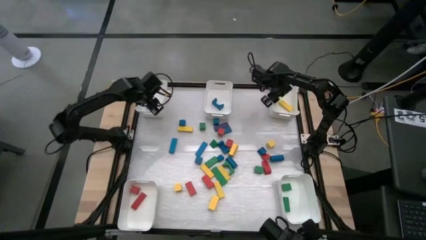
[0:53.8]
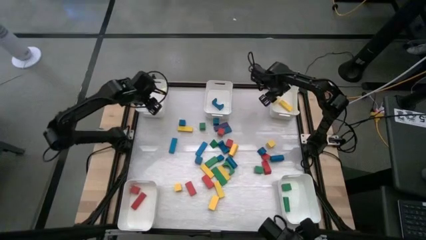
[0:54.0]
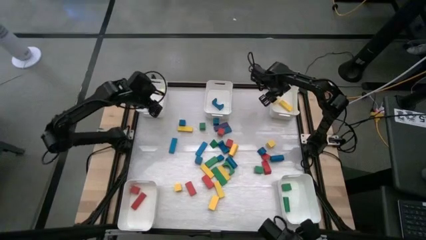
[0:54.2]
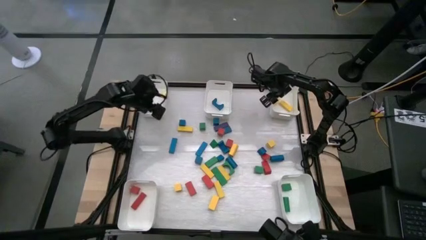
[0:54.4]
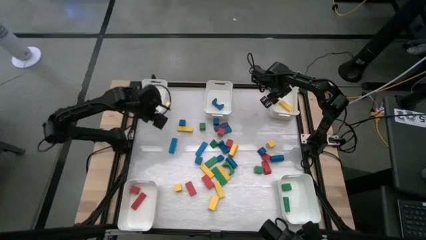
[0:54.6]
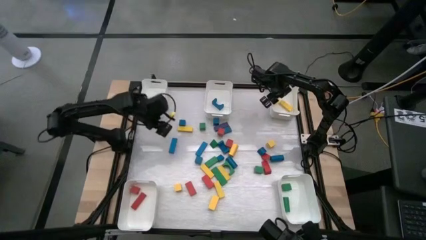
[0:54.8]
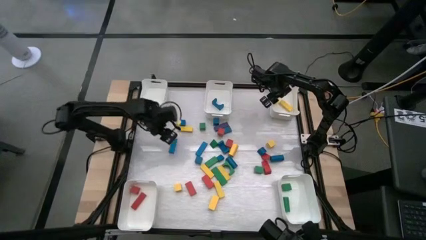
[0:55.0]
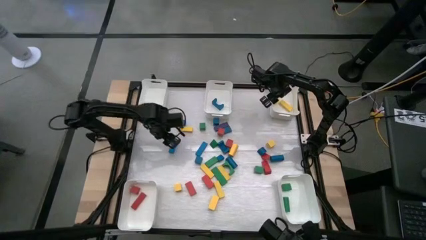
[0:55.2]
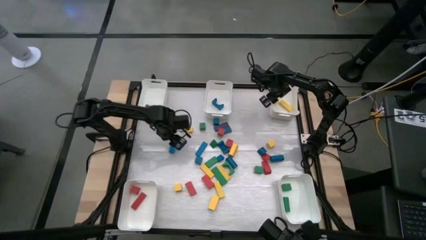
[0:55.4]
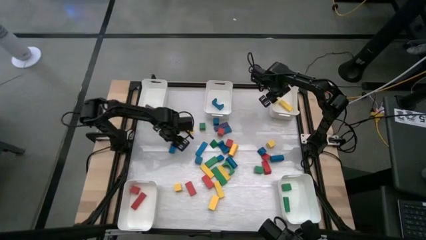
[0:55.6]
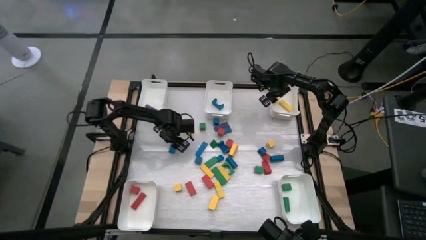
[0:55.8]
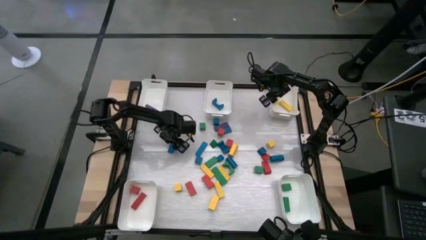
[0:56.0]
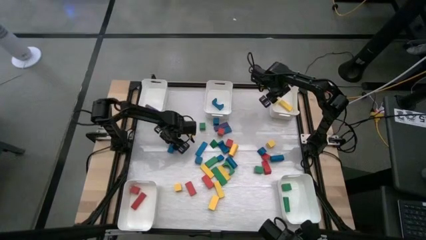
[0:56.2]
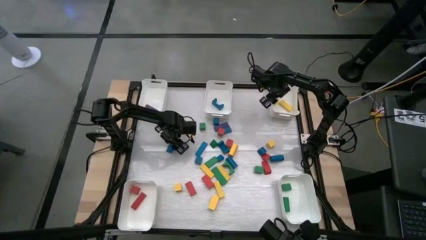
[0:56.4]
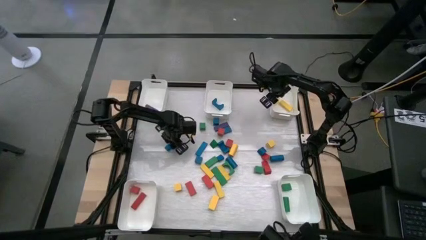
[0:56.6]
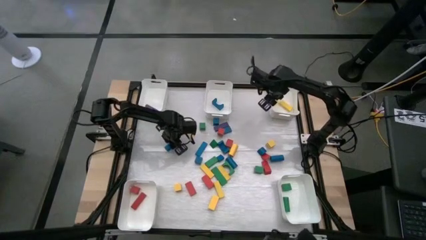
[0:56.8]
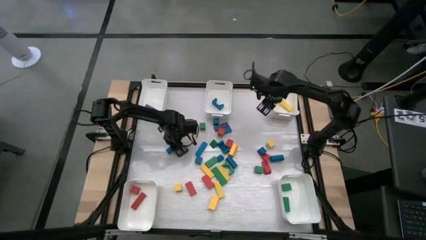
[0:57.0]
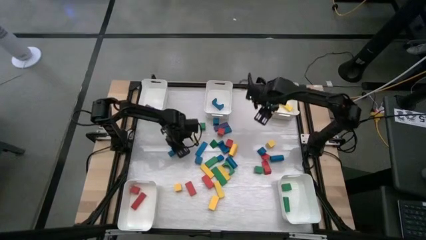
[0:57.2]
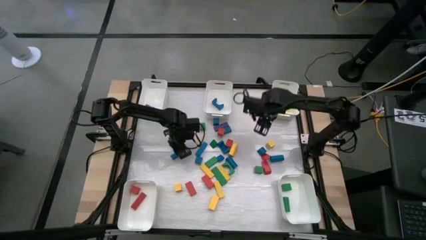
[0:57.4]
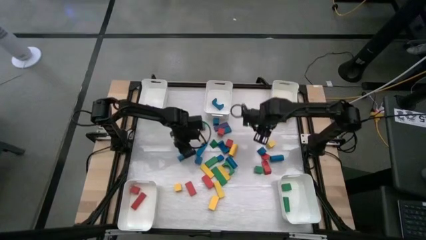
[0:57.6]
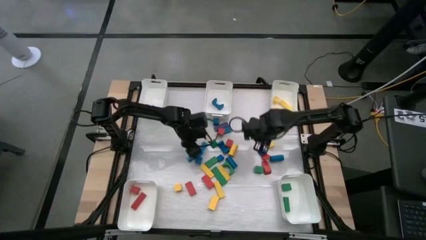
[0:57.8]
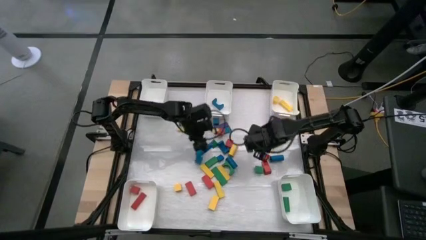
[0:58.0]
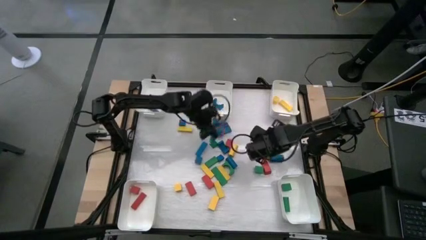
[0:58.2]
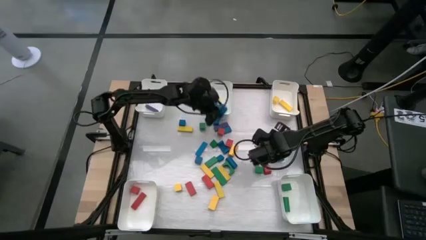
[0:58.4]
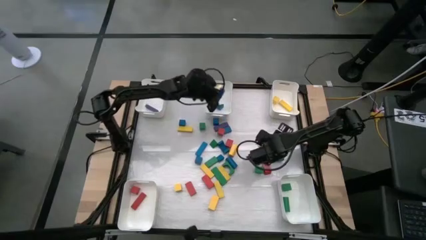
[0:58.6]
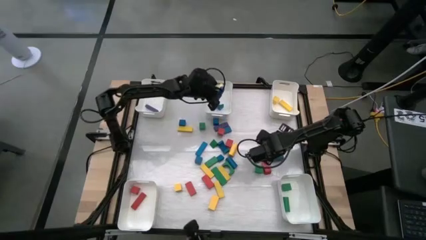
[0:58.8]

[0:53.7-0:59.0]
Task: Sort blocks
Put the blue block into the top center white bin

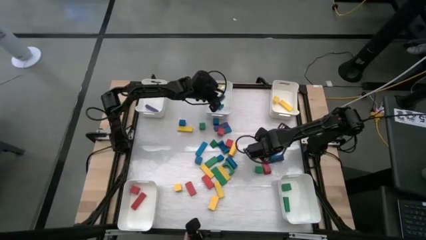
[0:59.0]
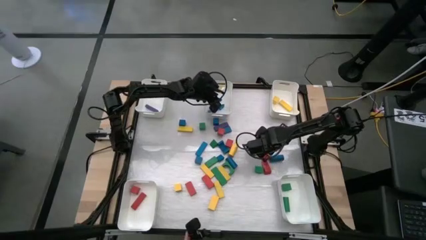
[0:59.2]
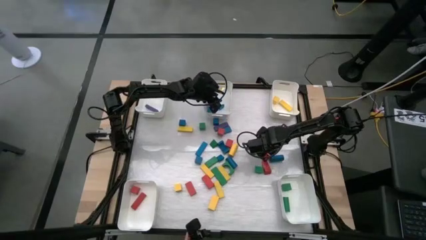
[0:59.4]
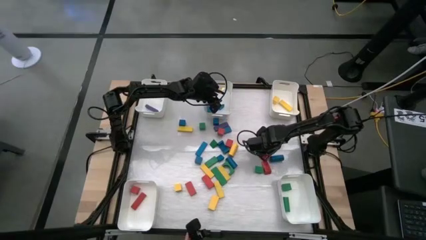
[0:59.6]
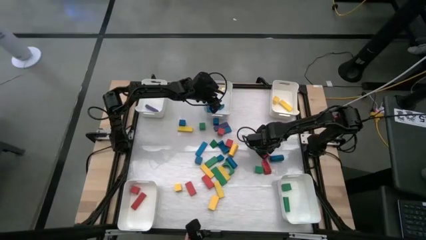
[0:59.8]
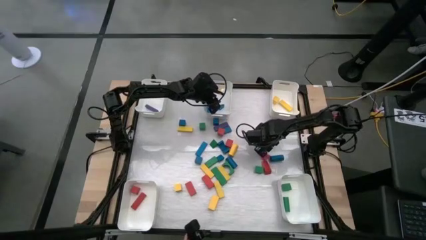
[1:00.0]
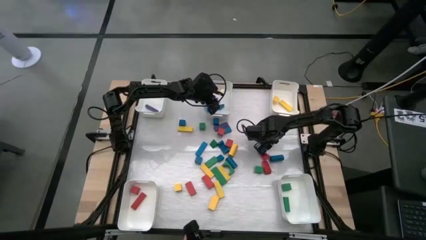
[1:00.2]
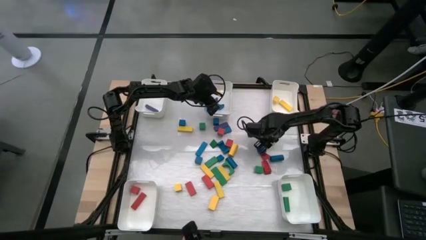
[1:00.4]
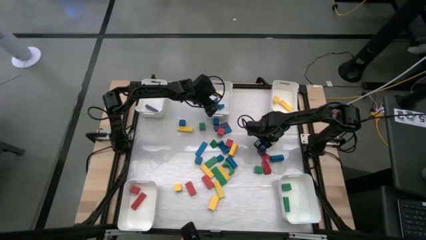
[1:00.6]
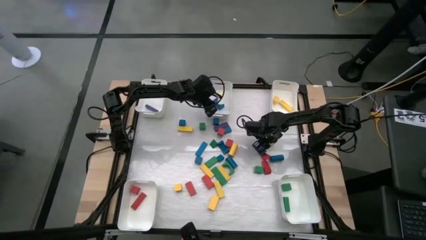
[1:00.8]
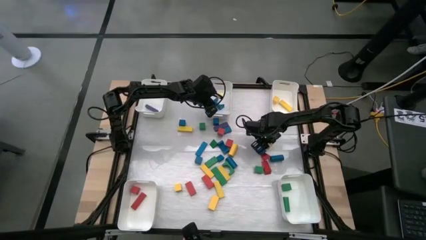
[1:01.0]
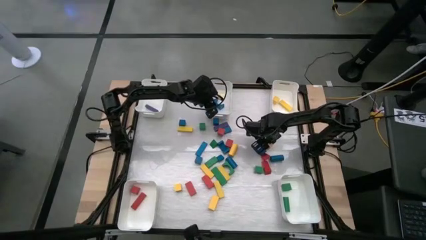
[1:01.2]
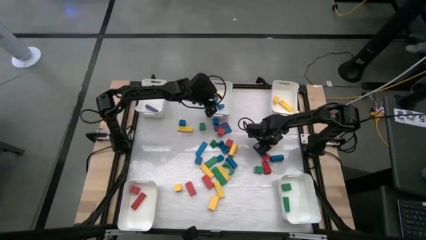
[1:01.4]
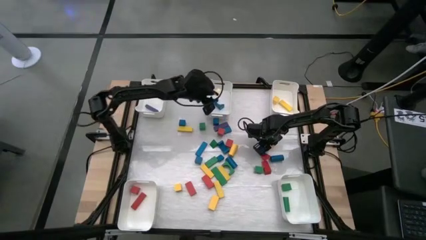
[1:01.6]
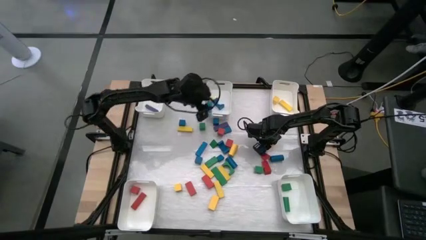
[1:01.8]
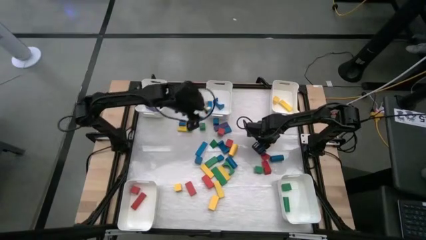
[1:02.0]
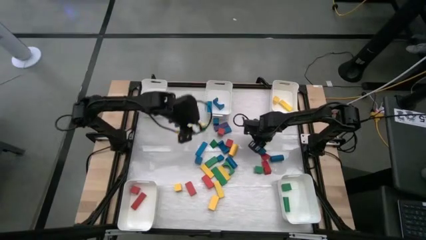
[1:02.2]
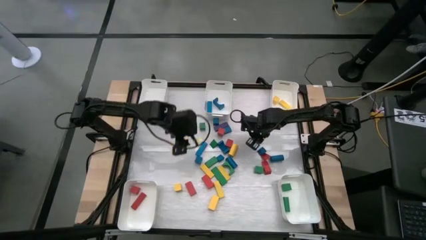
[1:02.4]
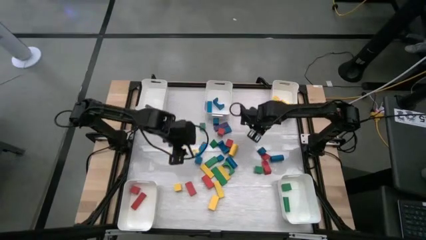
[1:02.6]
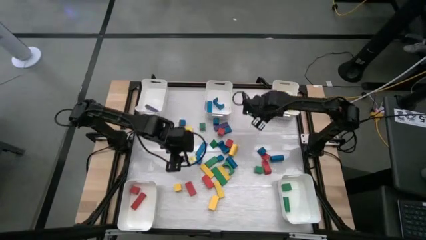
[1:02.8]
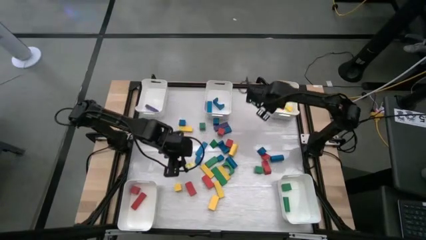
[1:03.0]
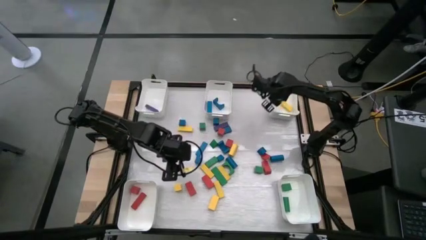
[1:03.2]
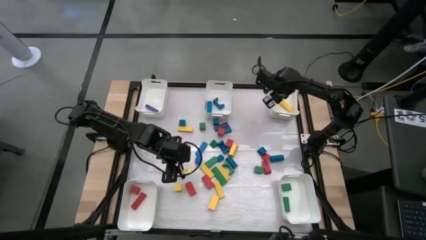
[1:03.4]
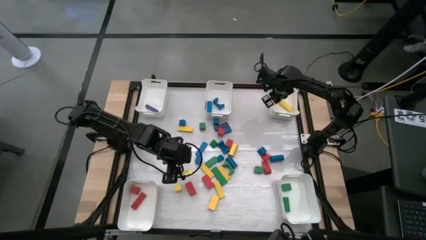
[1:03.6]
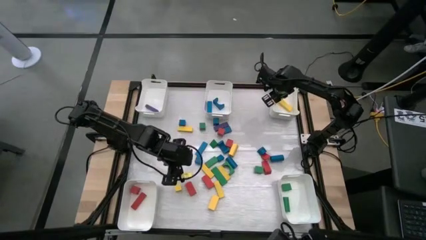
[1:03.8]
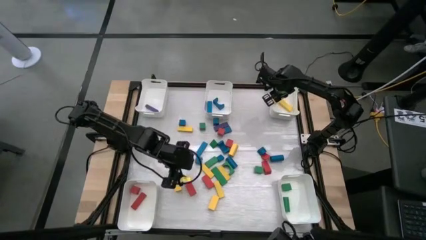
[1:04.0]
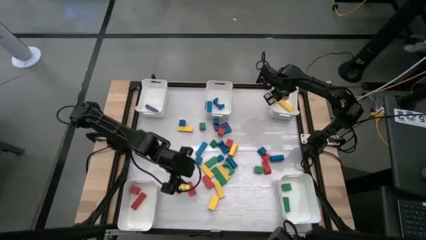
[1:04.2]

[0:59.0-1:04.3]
Put the yellow block into the top right white bin

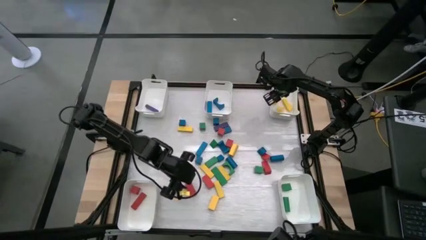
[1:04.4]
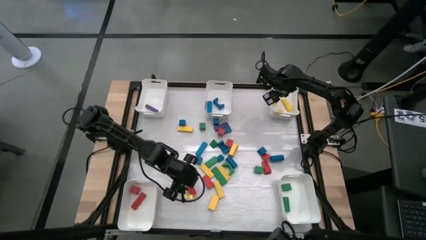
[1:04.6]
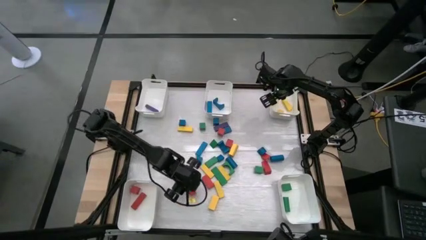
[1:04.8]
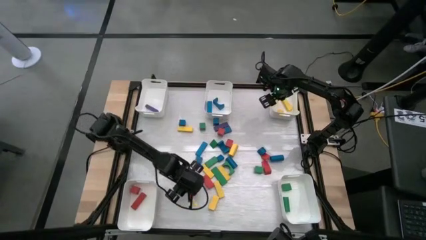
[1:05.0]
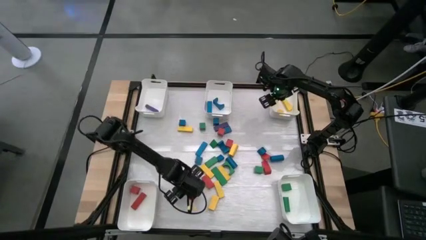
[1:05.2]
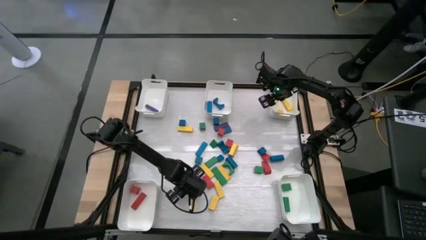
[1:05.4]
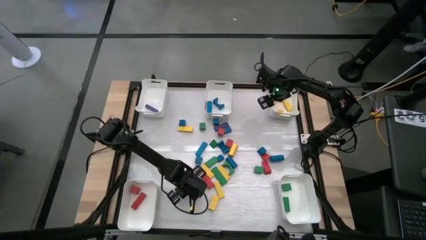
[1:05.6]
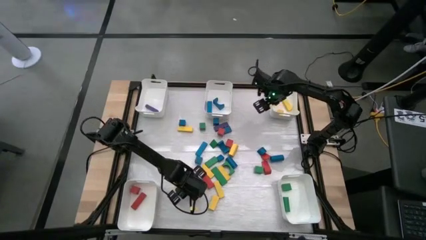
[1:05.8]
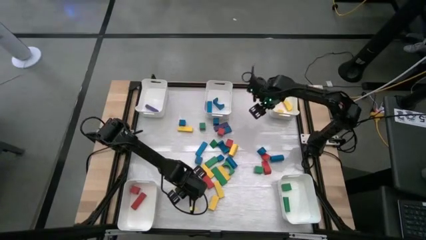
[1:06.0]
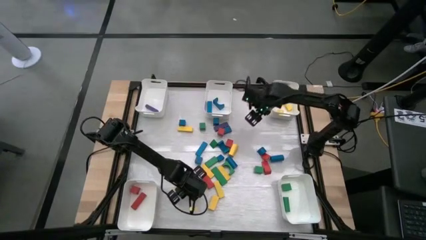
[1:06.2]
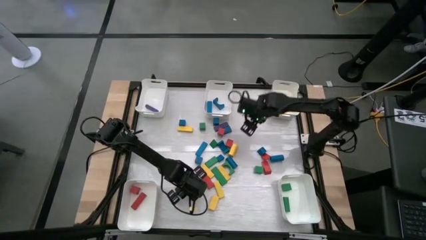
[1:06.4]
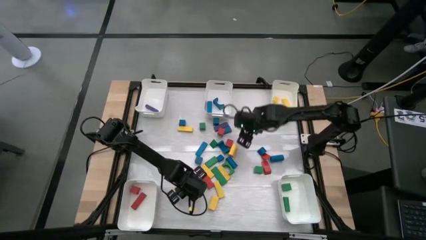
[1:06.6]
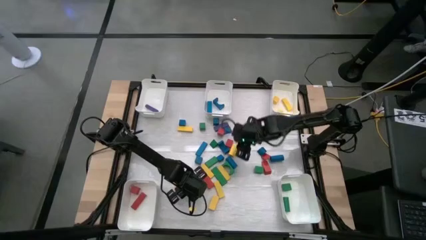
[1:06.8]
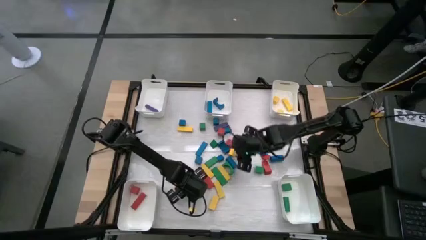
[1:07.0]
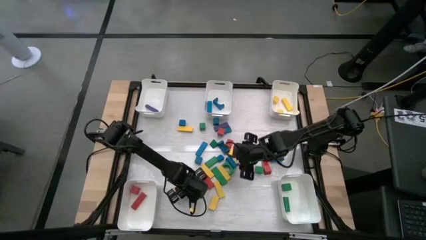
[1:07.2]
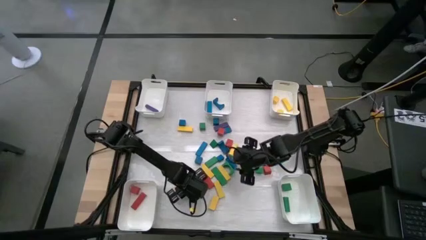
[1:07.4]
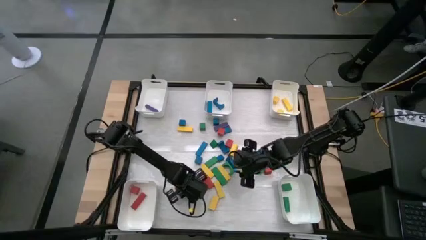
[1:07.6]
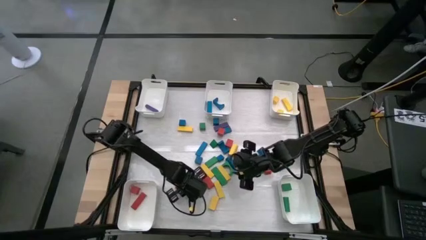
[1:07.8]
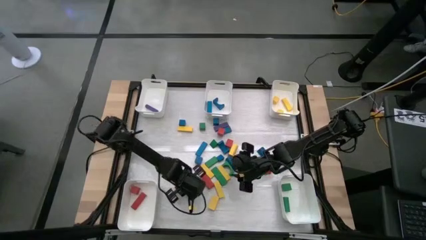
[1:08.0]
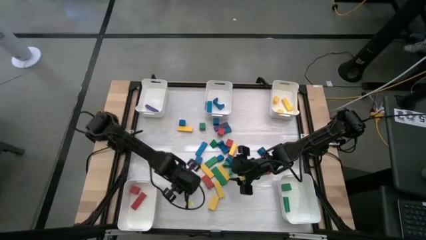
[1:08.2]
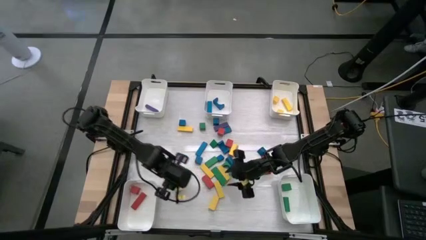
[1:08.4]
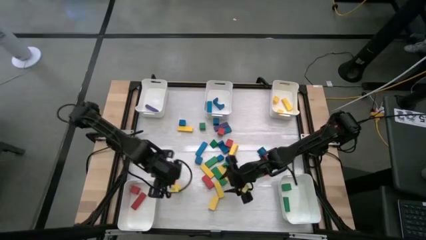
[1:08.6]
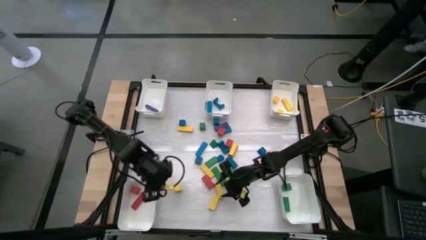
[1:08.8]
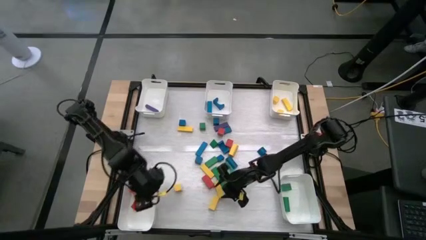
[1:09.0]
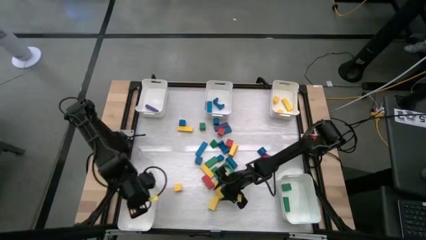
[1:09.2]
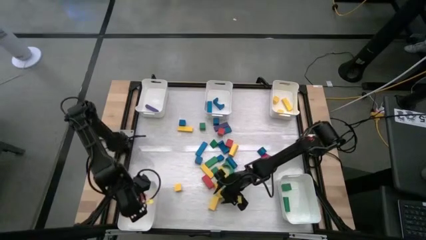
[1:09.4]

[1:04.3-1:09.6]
Put the red block into the bottom left white bin

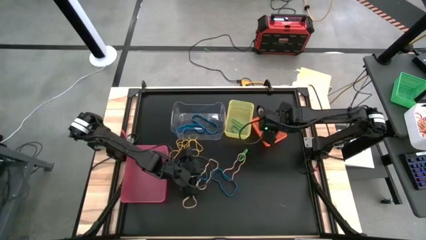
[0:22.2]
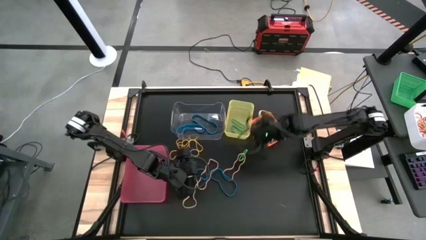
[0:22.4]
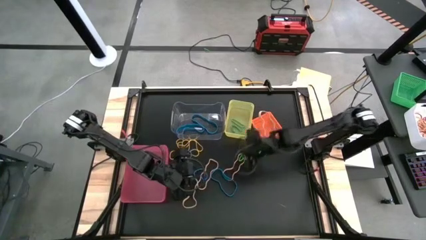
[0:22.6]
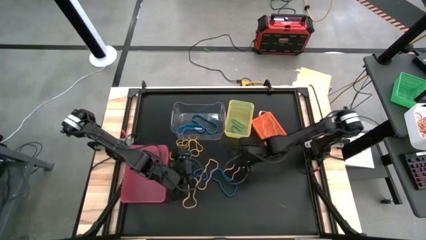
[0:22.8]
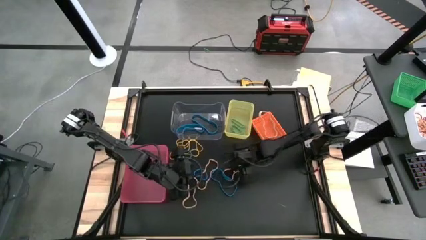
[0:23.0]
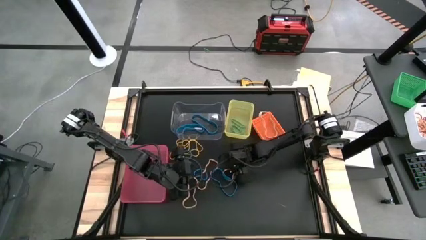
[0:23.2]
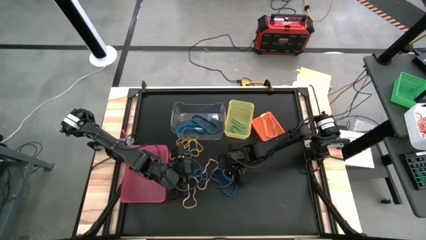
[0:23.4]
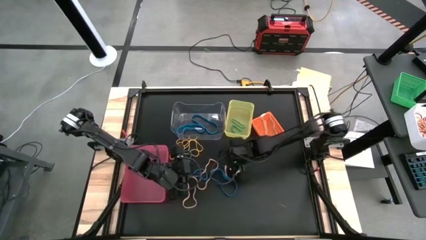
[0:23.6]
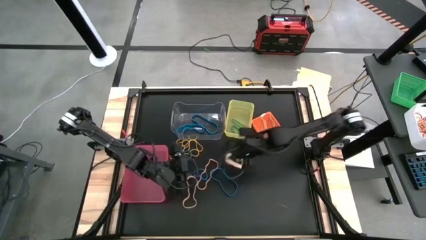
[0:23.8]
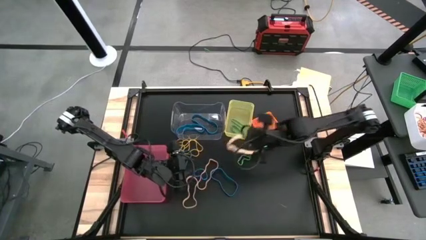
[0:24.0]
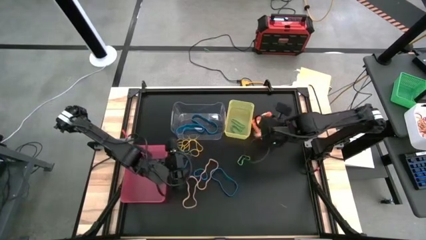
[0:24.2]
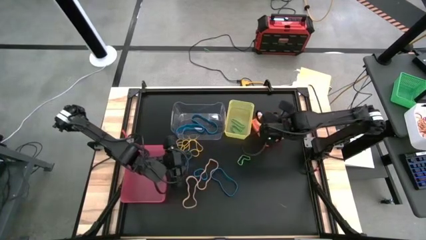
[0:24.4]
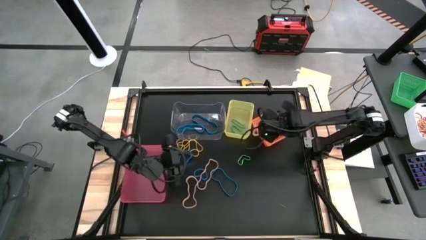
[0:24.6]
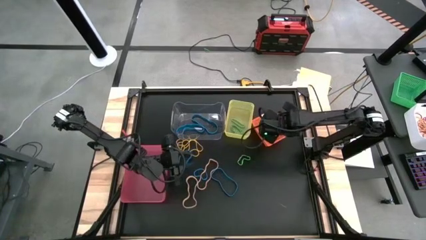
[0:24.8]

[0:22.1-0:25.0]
Task: Sort rubber bands into baskets
Put the orange rubber band into the orange bin
